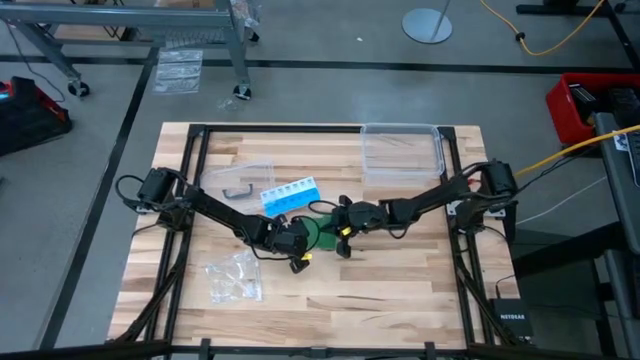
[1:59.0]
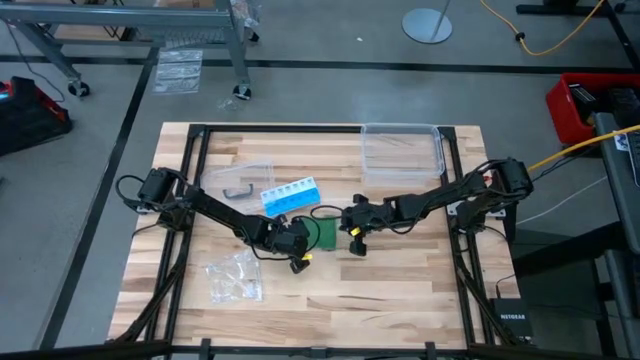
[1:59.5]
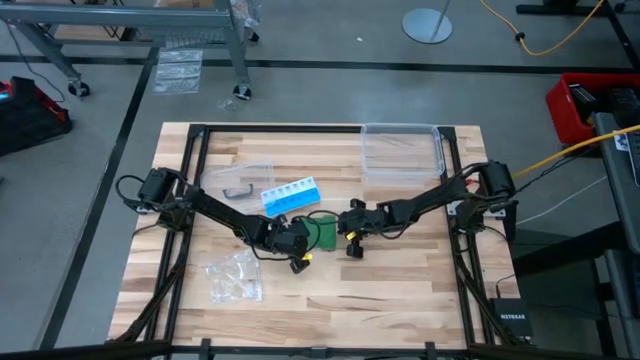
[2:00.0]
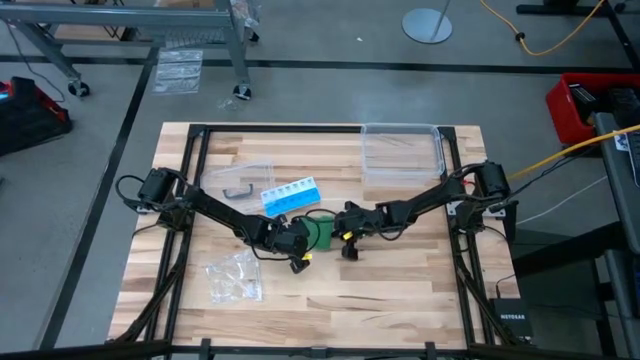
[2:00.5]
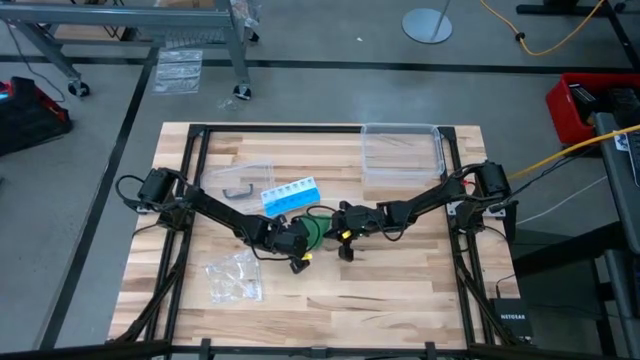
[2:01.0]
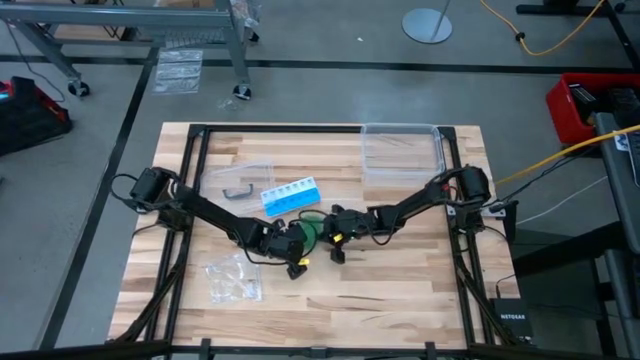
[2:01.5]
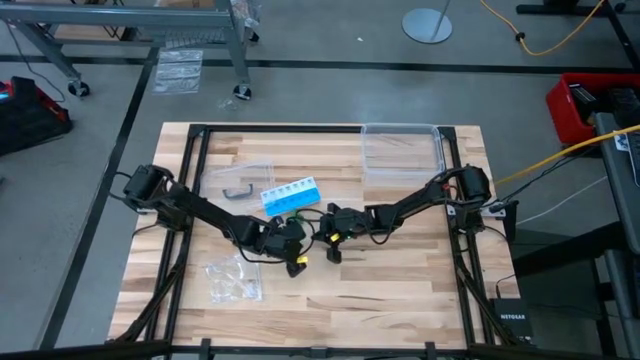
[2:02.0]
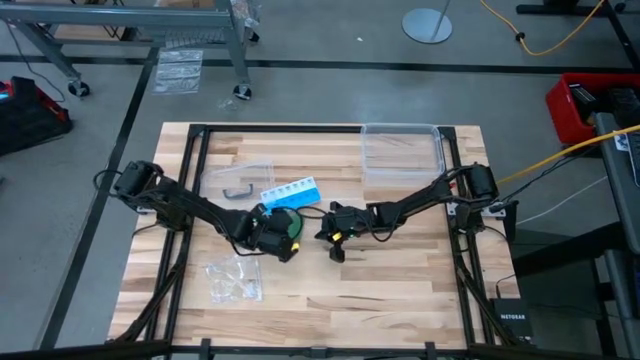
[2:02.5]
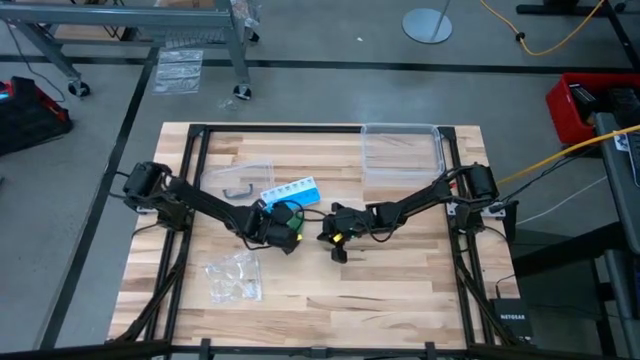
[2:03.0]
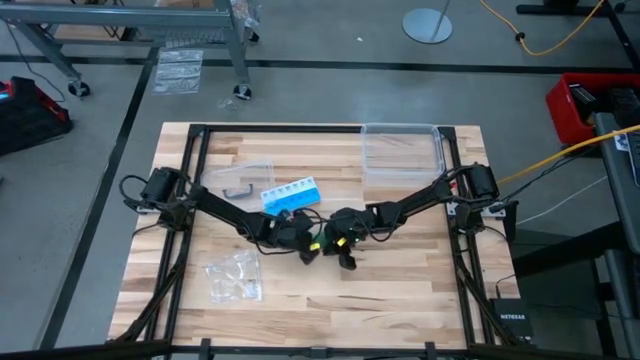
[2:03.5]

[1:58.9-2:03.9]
Task: Roll bandage
Roll the green bandage

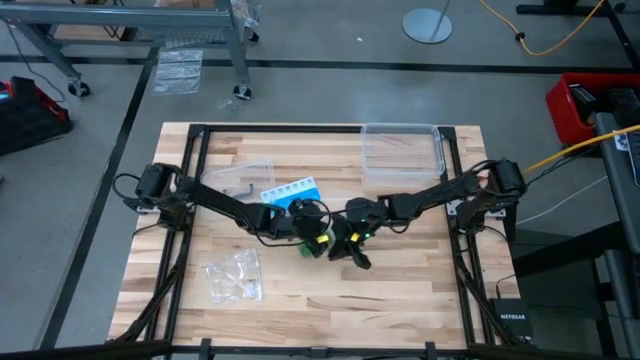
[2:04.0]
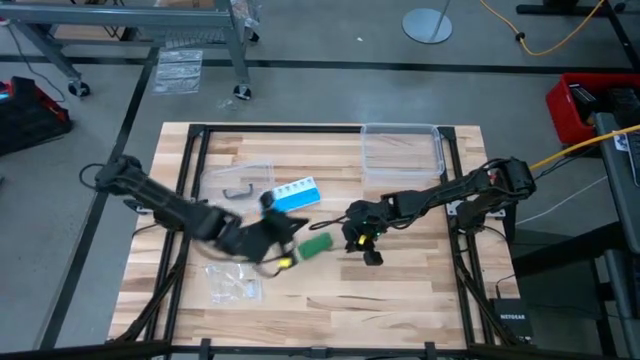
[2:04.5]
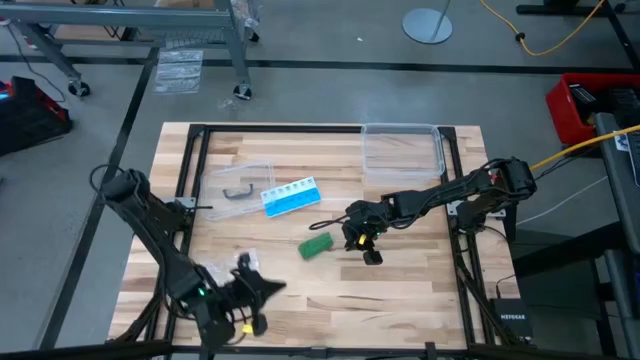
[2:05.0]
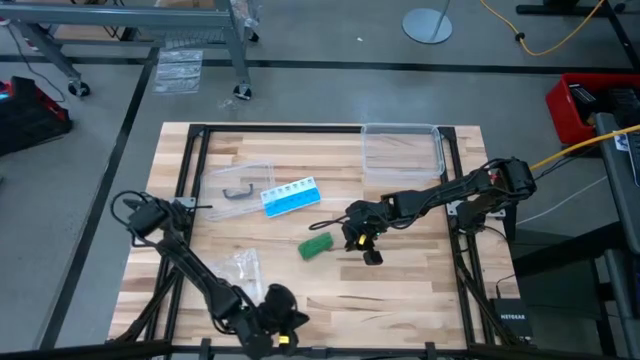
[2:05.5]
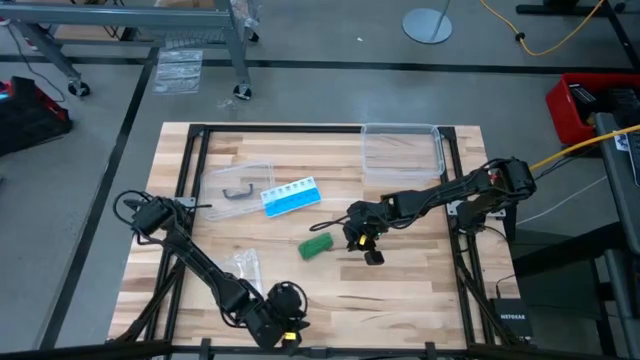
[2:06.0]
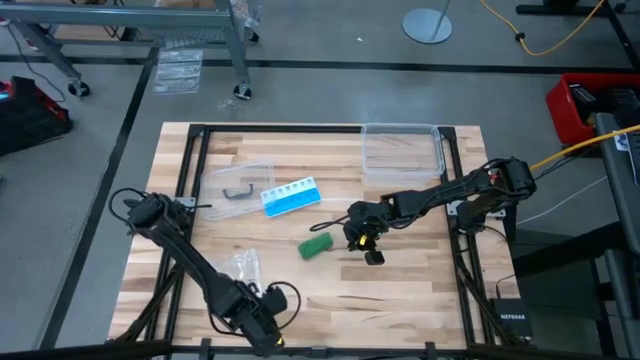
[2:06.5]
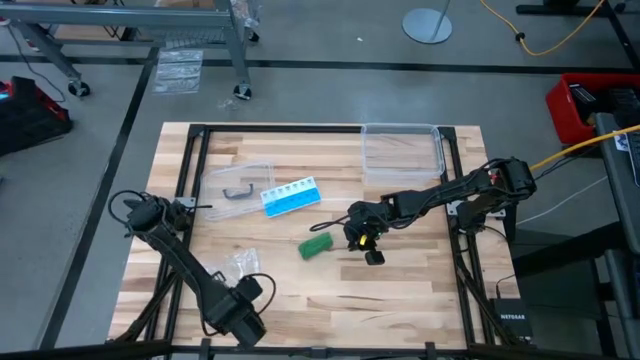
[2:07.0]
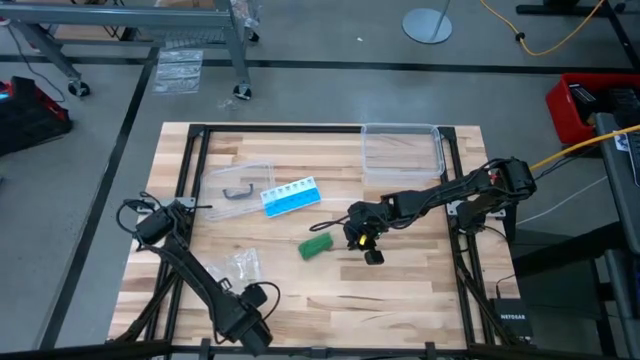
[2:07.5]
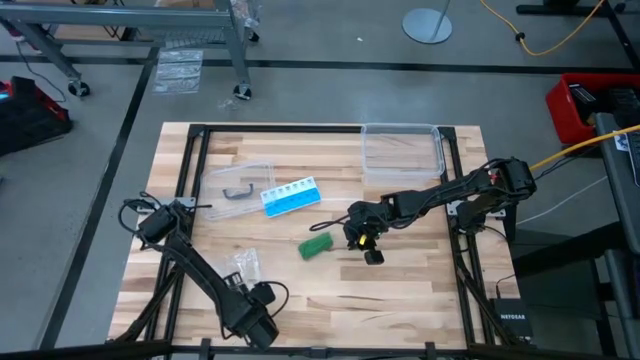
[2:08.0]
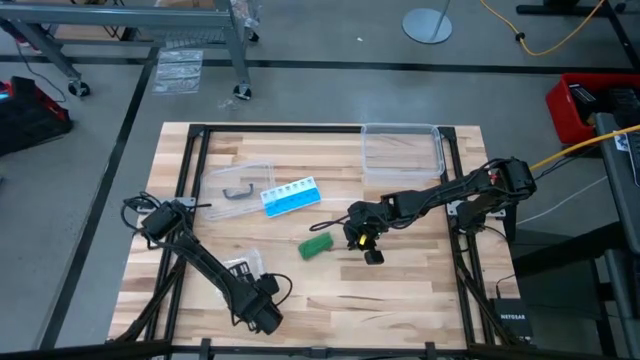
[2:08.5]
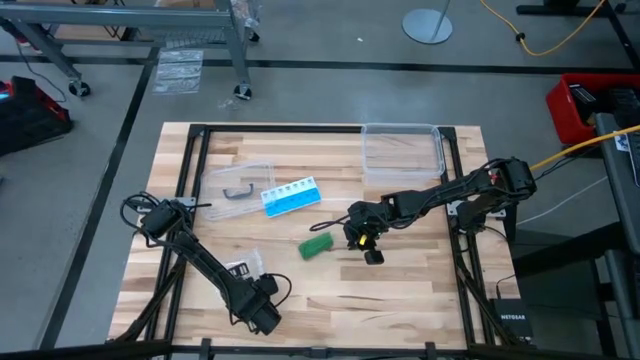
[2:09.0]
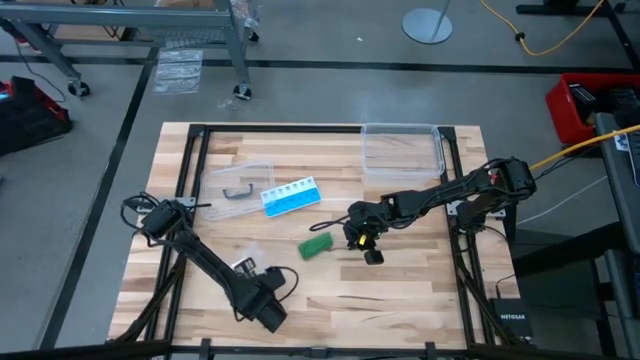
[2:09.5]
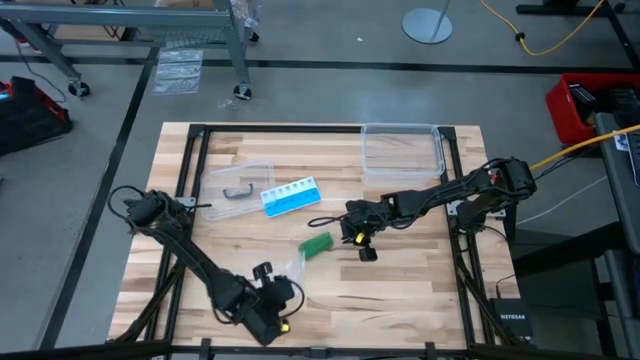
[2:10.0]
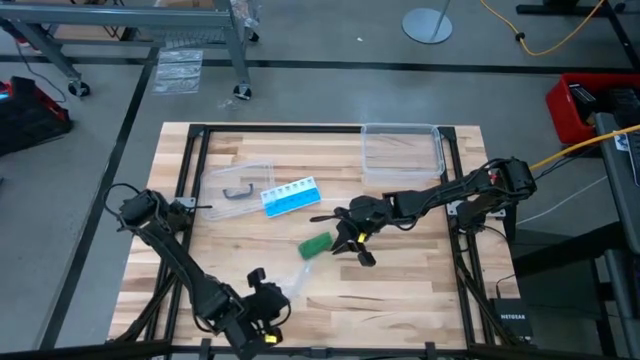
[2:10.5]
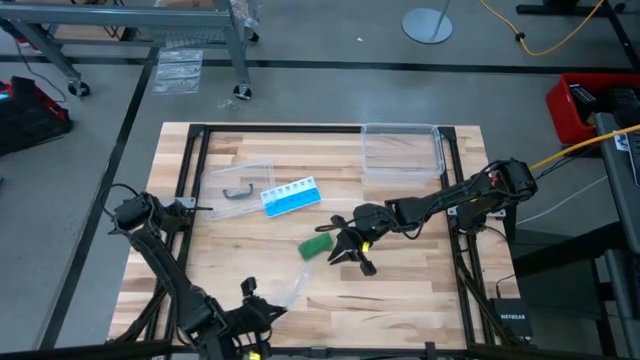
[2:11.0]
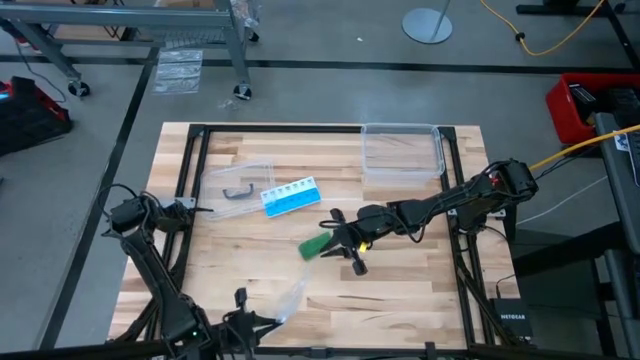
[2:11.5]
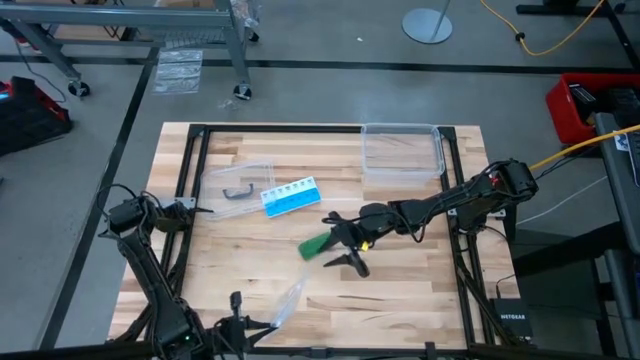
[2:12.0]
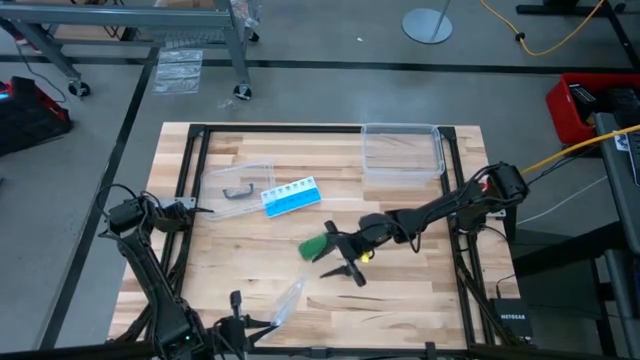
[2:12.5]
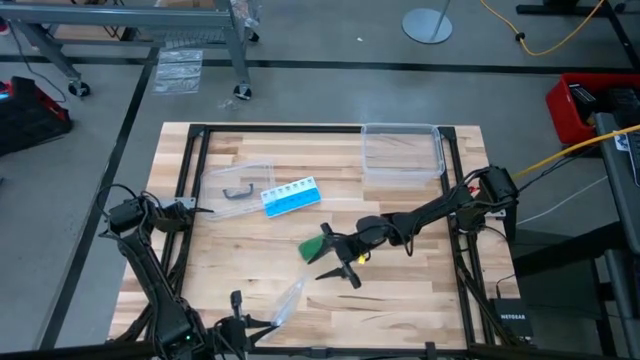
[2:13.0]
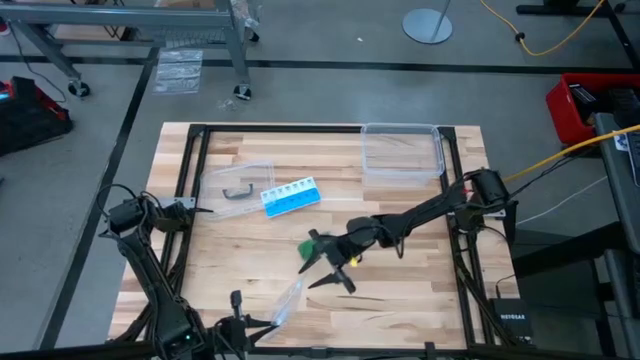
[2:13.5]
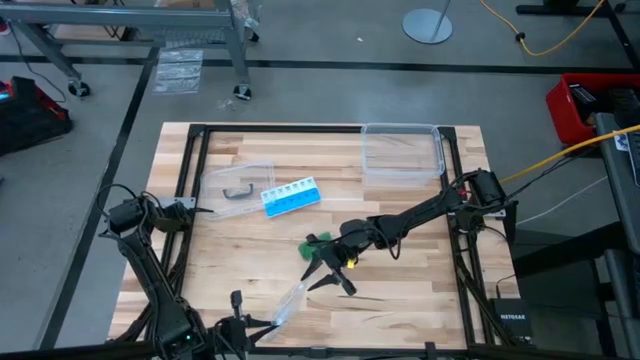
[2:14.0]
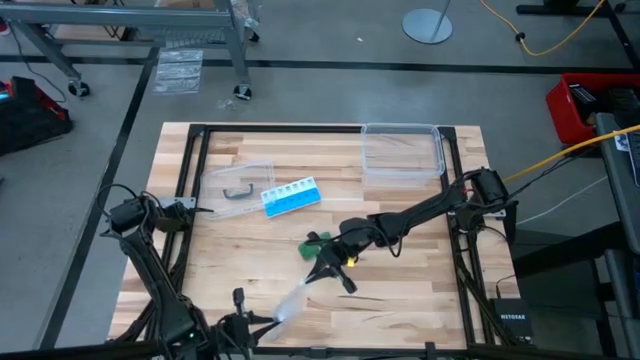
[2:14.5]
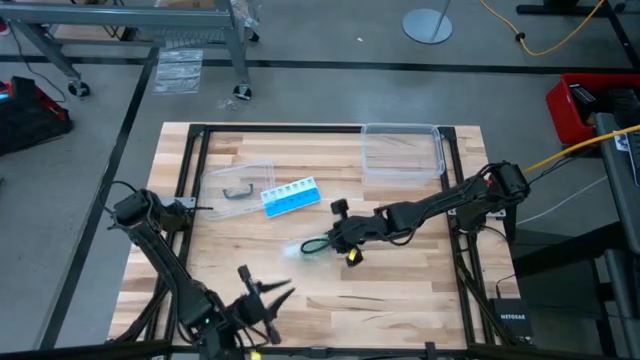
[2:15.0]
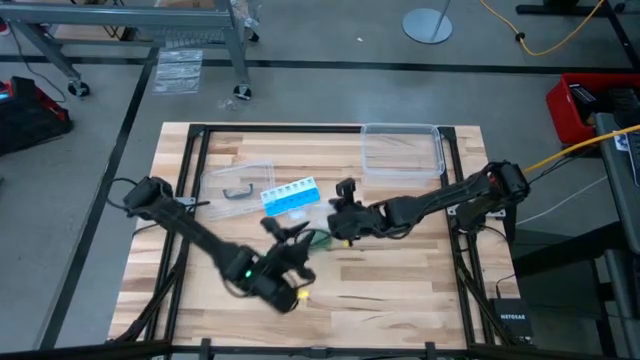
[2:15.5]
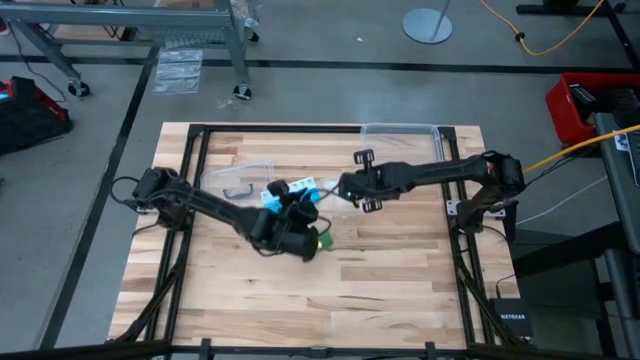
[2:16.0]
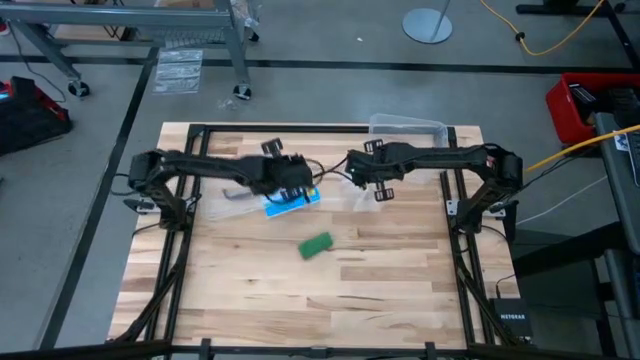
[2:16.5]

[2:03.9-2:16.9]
Open the transparent zip bag

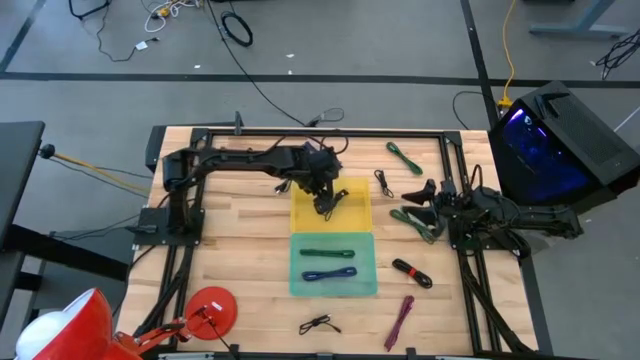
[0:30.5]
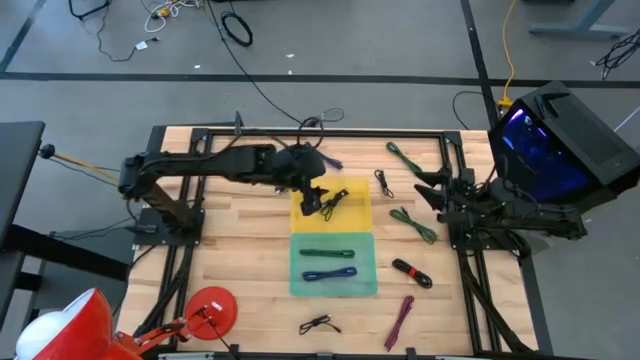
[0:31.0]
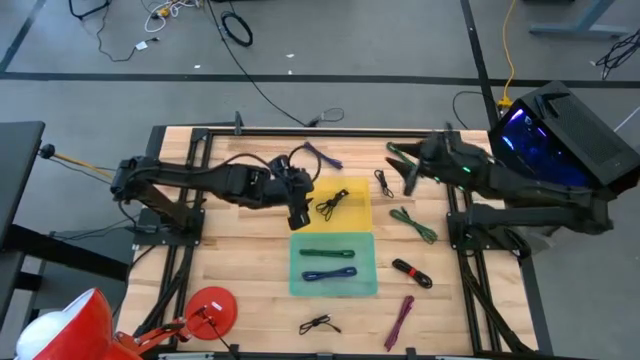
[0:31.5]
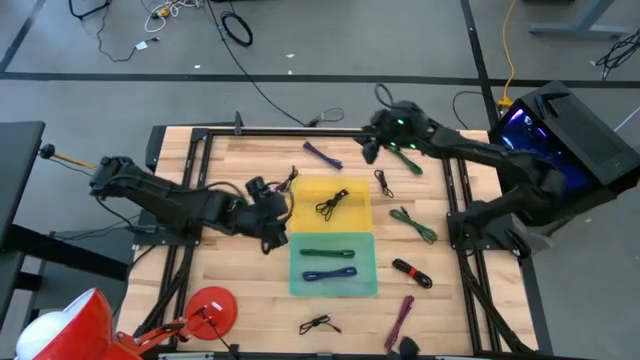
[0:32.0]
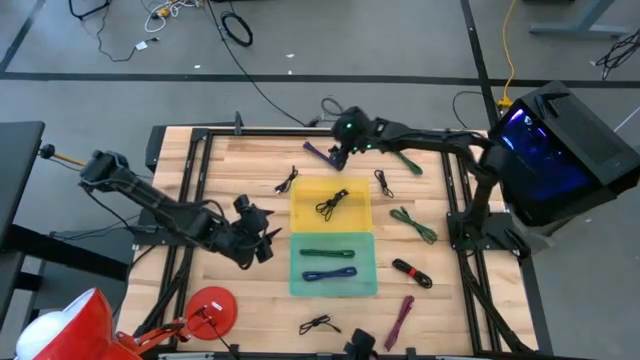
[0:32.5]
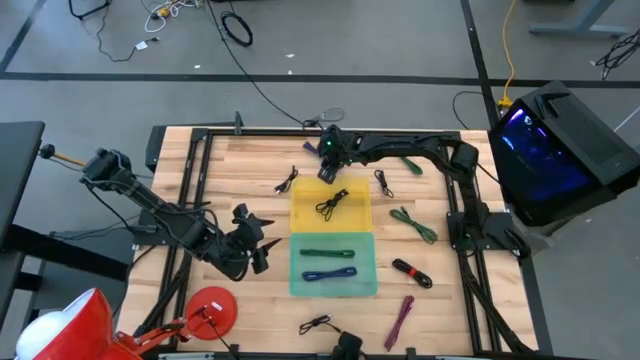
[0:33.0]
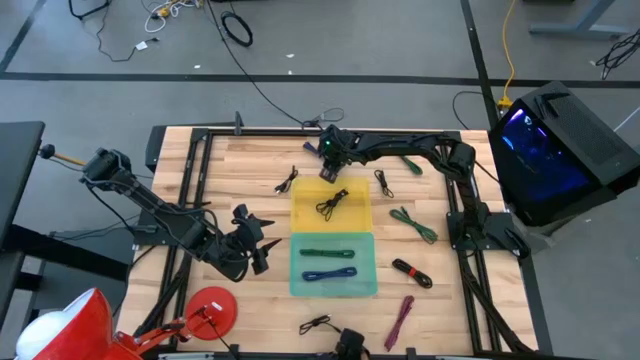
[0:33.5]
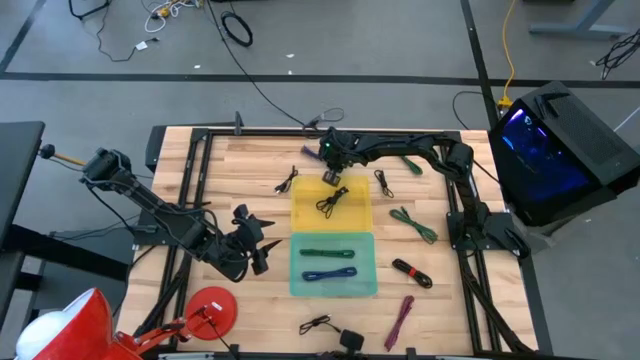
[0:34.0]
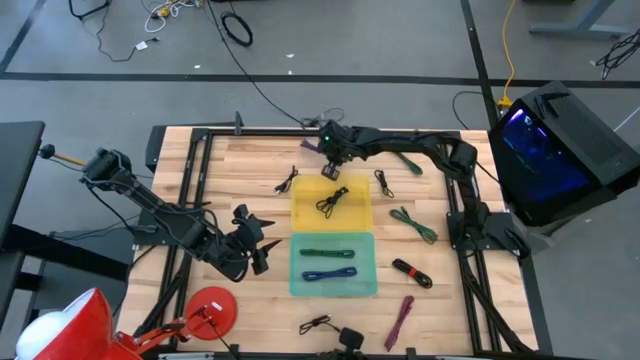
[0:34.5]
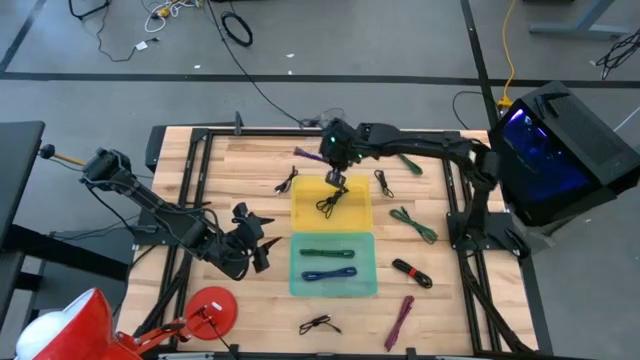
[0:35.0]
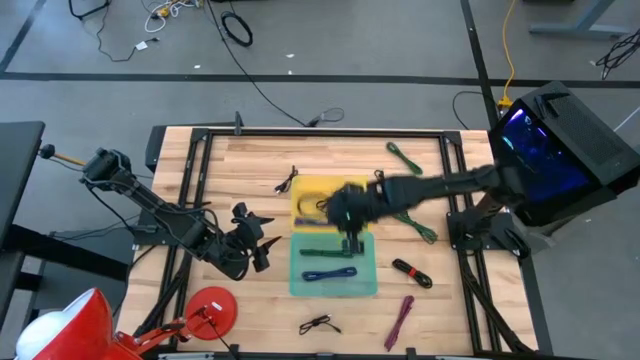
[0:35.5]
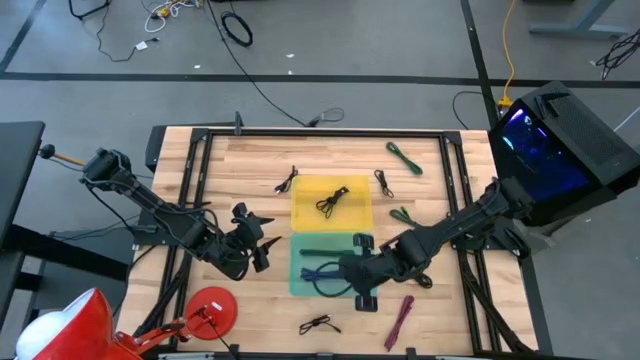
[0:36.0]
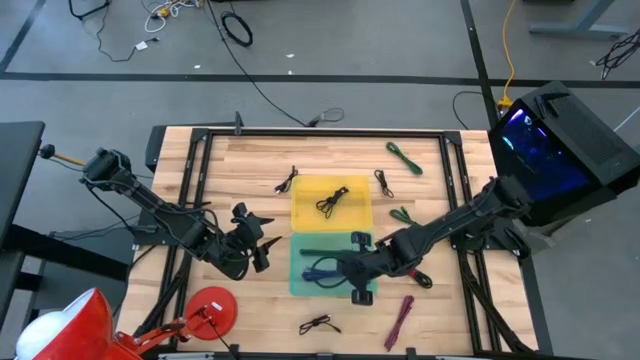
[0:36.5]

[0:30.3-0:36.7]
Task: Pick & Place USB Port
Put the striped blue charger cable into the blue bin
